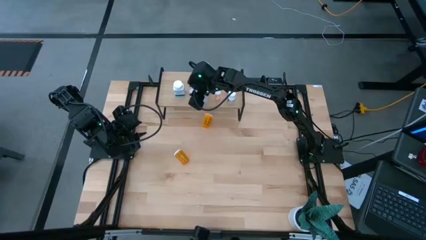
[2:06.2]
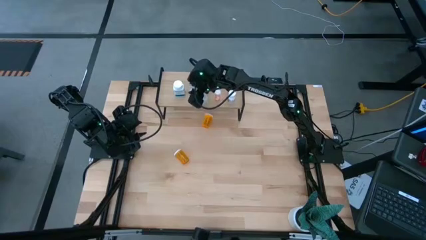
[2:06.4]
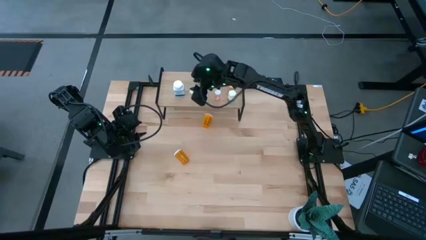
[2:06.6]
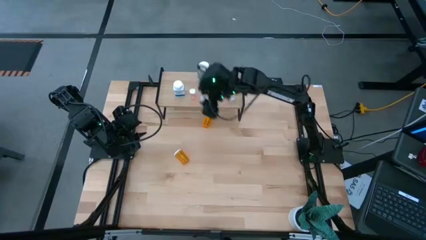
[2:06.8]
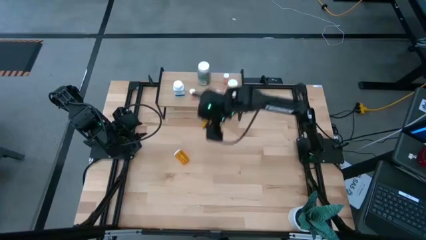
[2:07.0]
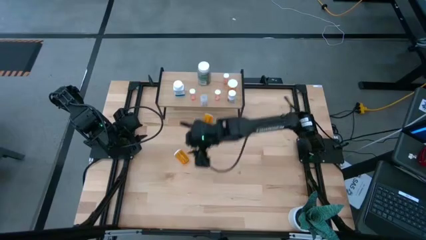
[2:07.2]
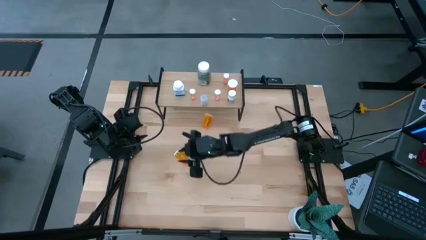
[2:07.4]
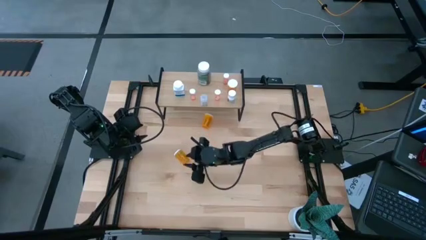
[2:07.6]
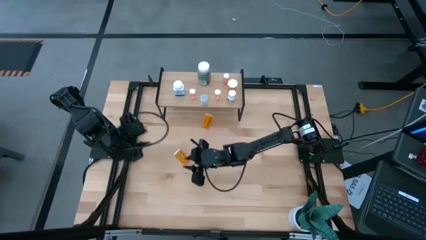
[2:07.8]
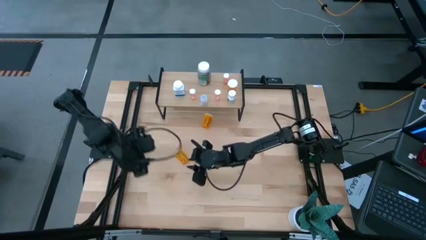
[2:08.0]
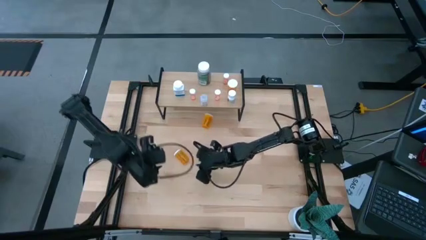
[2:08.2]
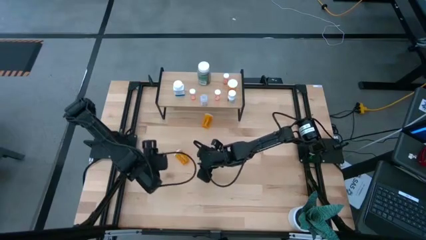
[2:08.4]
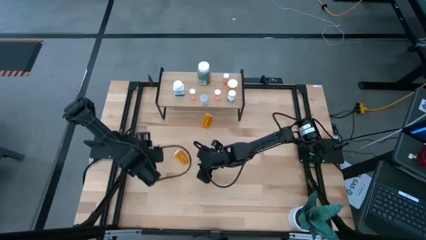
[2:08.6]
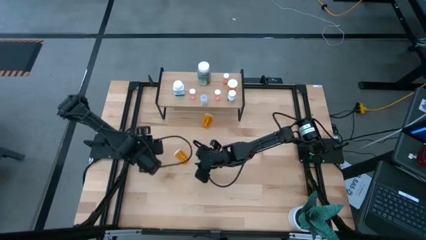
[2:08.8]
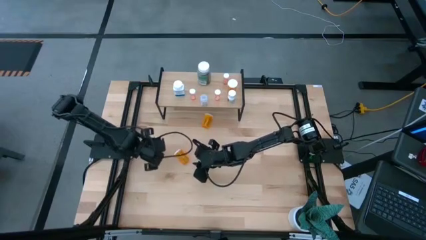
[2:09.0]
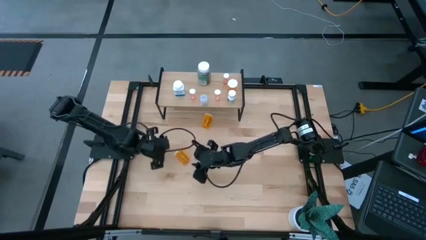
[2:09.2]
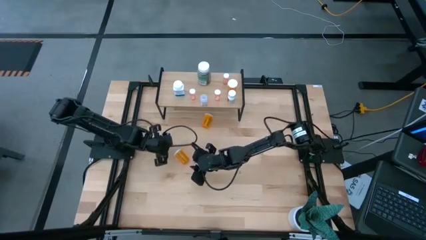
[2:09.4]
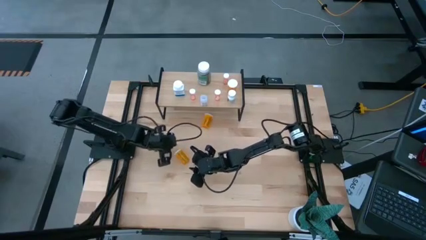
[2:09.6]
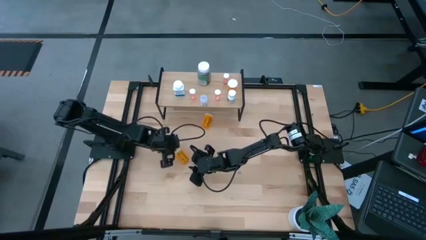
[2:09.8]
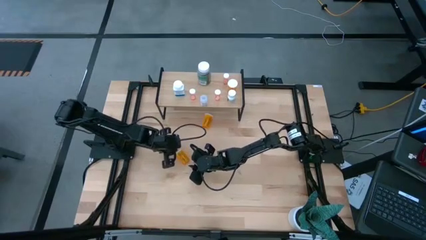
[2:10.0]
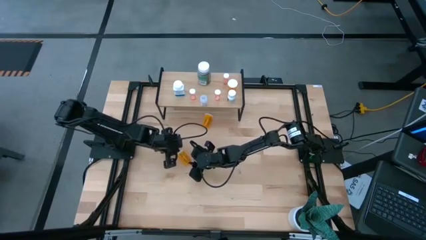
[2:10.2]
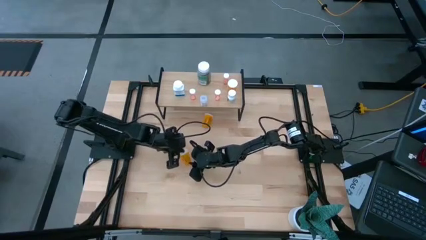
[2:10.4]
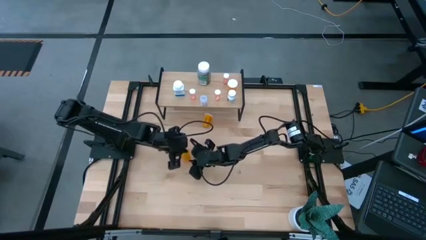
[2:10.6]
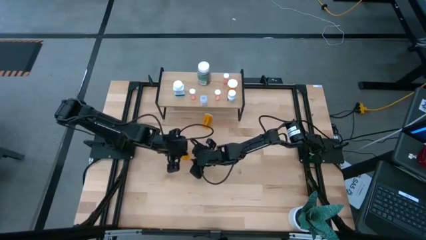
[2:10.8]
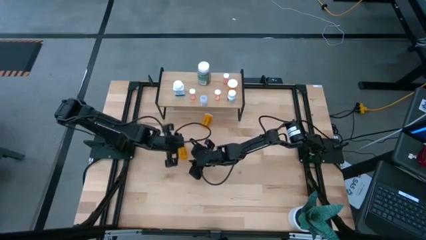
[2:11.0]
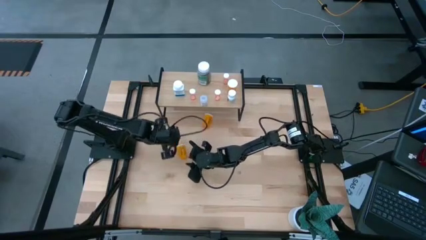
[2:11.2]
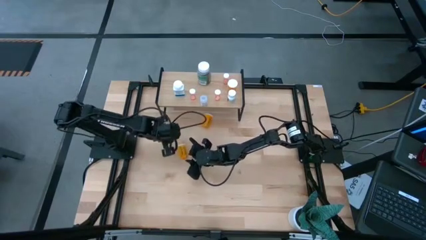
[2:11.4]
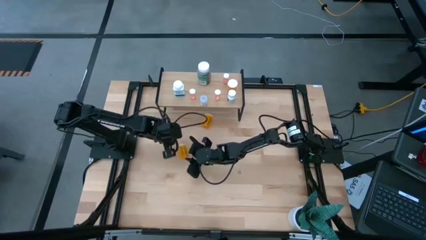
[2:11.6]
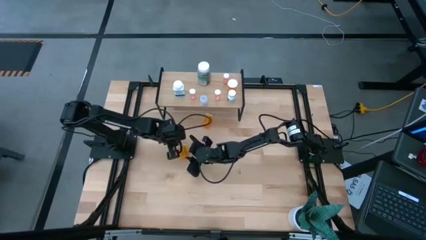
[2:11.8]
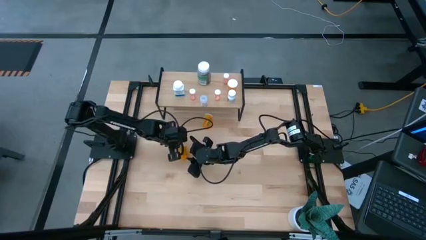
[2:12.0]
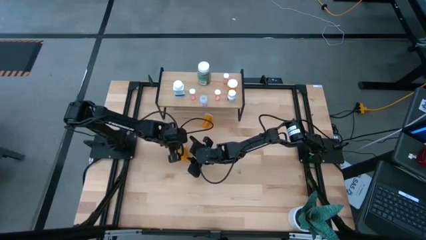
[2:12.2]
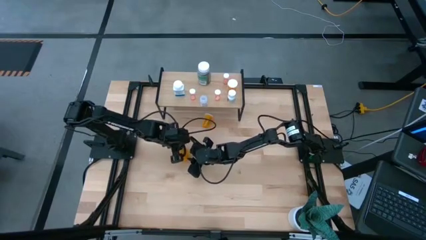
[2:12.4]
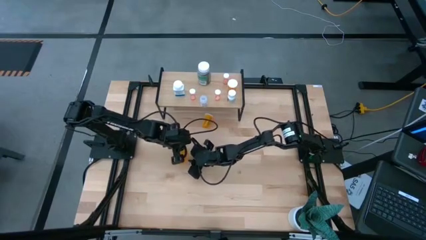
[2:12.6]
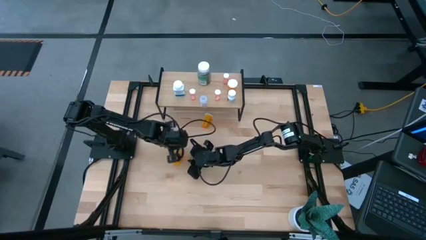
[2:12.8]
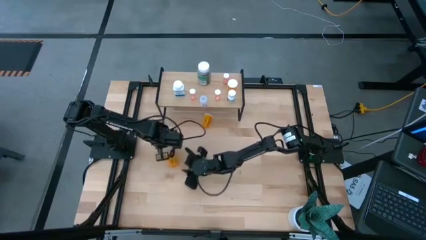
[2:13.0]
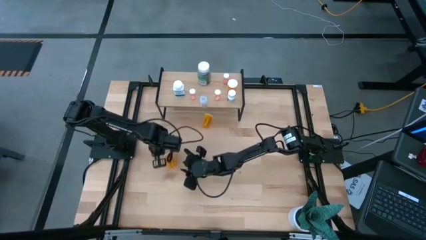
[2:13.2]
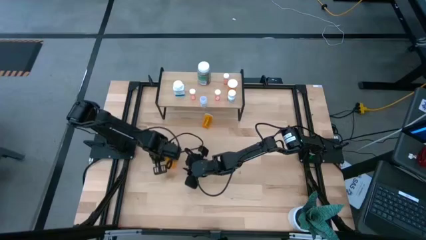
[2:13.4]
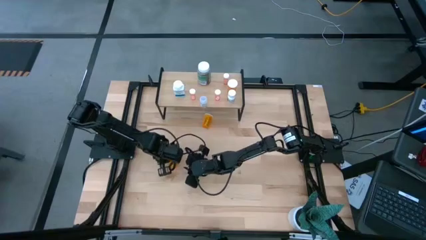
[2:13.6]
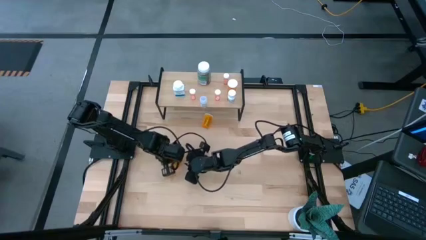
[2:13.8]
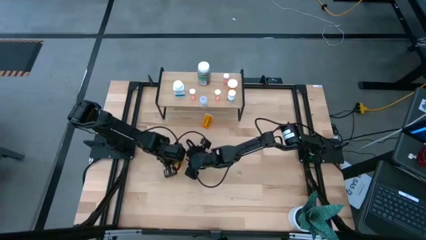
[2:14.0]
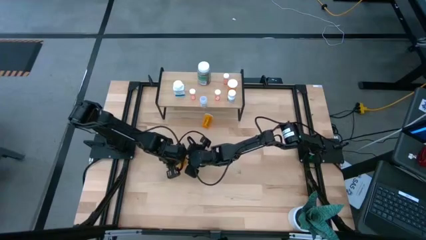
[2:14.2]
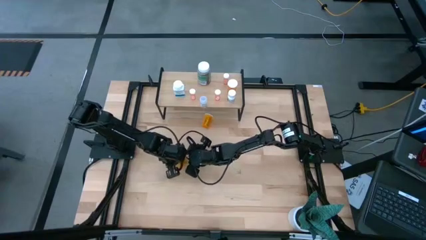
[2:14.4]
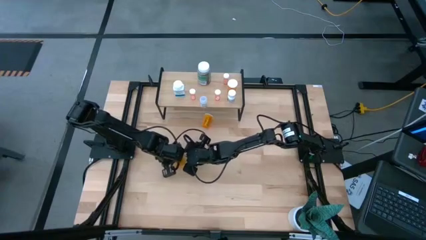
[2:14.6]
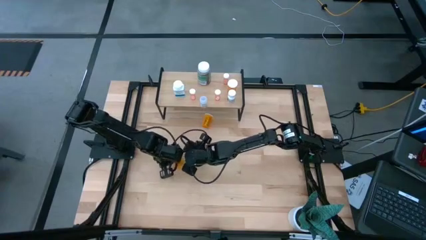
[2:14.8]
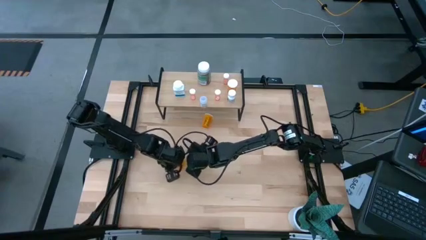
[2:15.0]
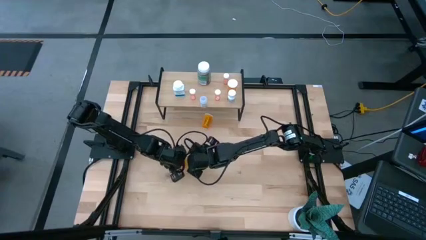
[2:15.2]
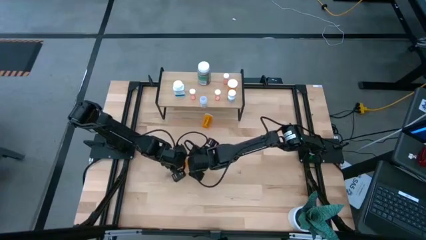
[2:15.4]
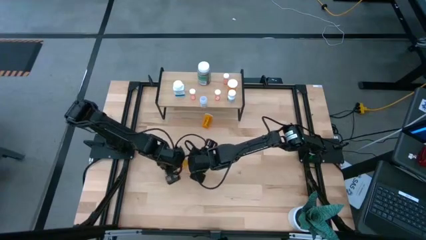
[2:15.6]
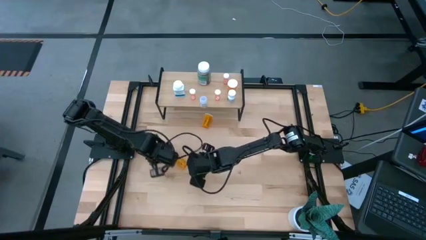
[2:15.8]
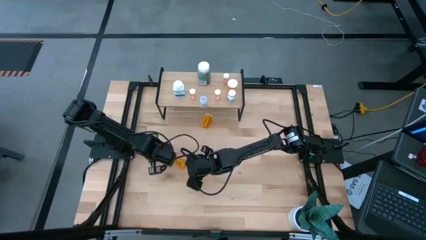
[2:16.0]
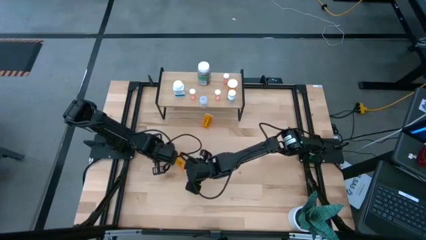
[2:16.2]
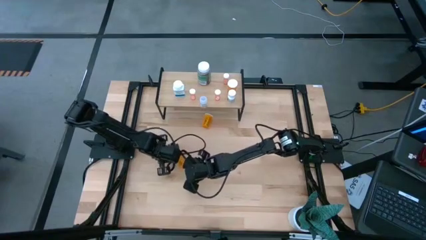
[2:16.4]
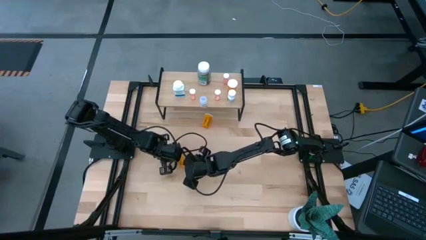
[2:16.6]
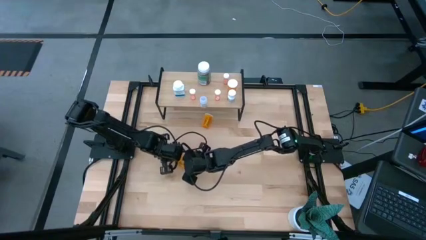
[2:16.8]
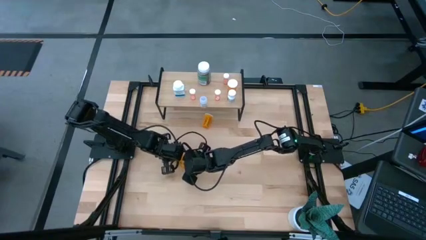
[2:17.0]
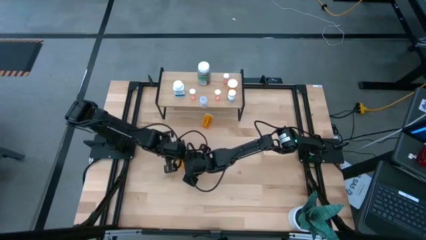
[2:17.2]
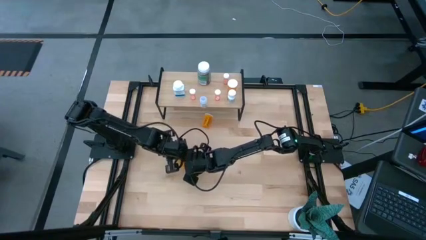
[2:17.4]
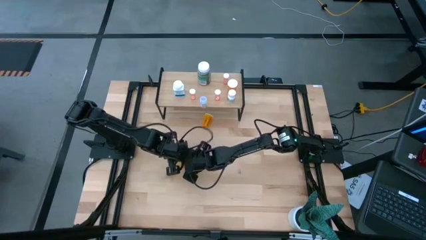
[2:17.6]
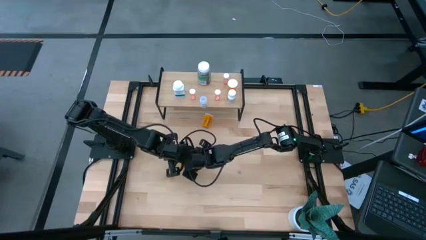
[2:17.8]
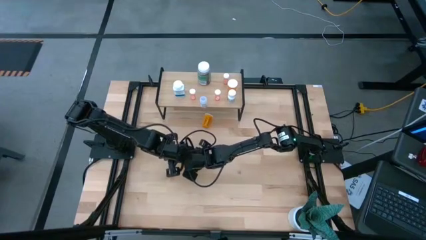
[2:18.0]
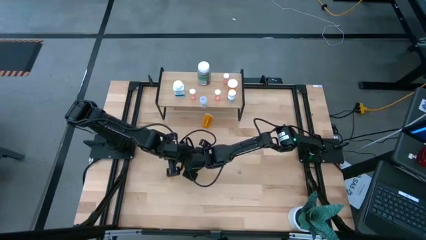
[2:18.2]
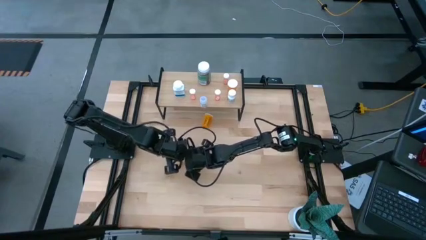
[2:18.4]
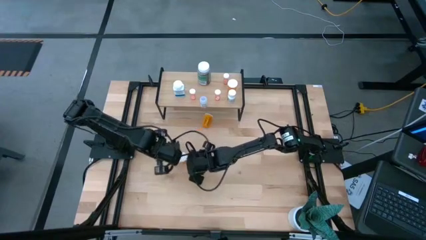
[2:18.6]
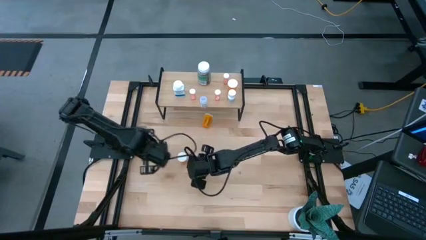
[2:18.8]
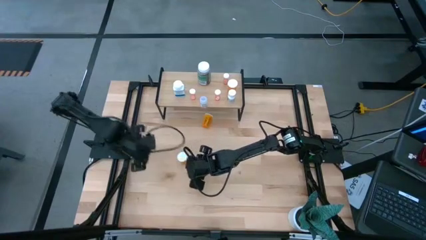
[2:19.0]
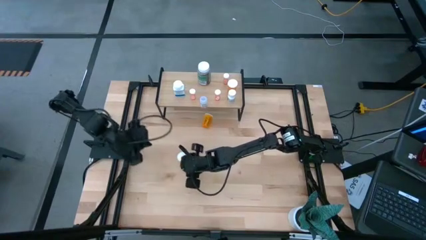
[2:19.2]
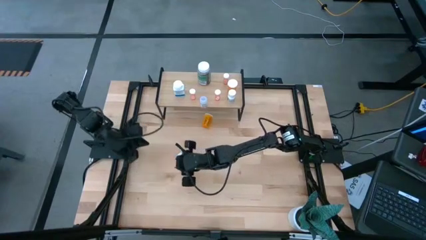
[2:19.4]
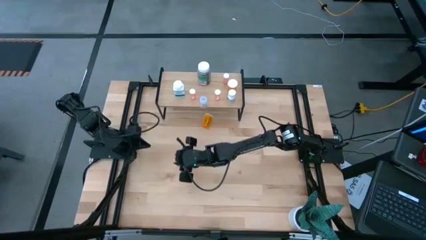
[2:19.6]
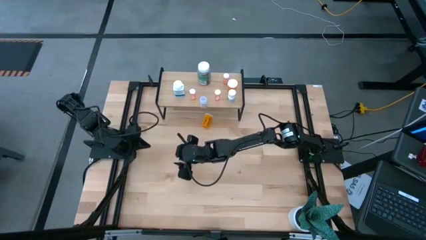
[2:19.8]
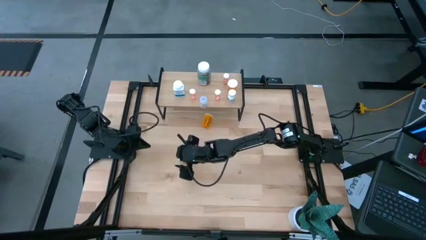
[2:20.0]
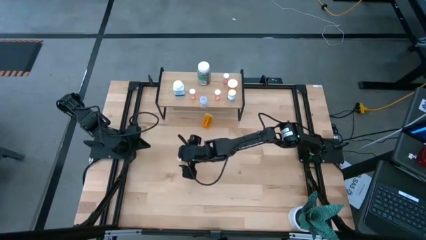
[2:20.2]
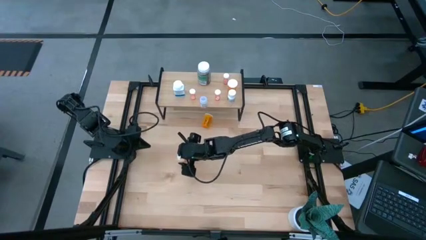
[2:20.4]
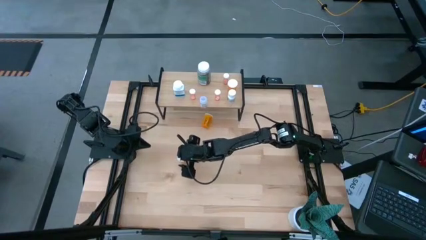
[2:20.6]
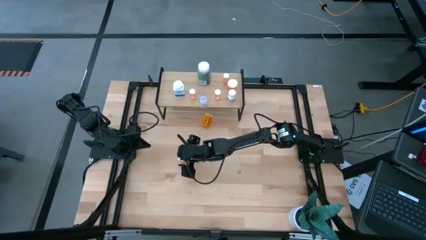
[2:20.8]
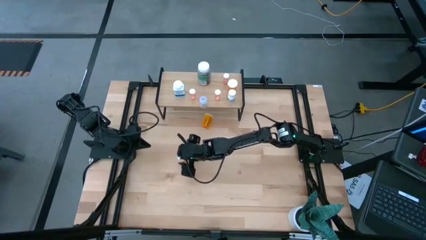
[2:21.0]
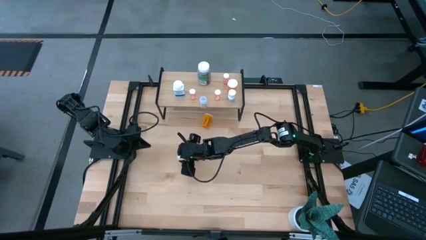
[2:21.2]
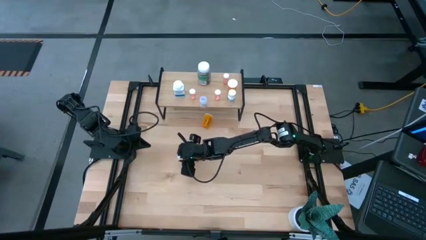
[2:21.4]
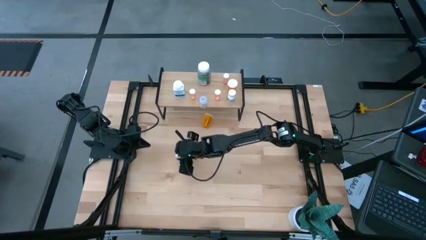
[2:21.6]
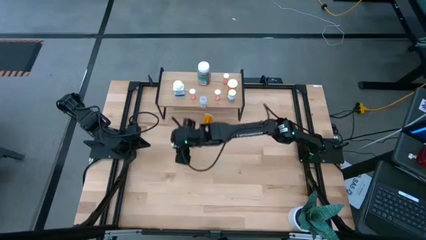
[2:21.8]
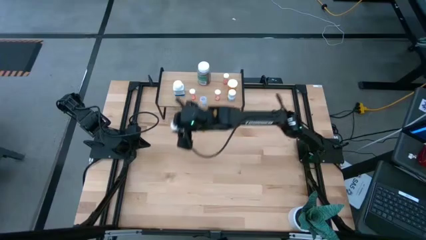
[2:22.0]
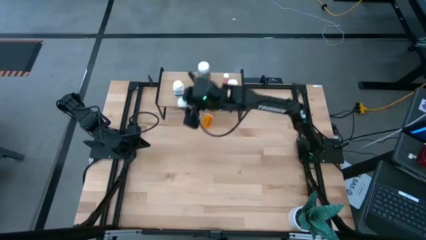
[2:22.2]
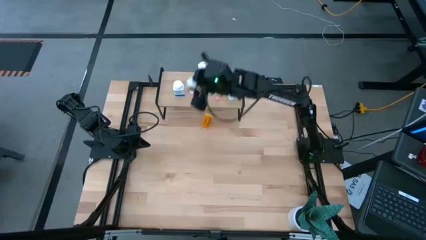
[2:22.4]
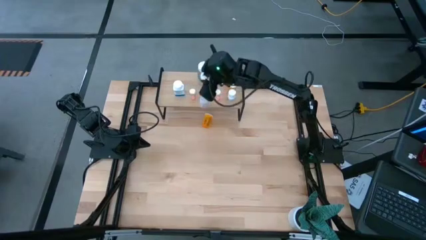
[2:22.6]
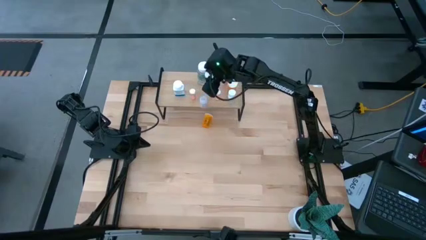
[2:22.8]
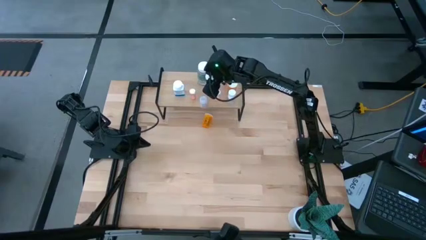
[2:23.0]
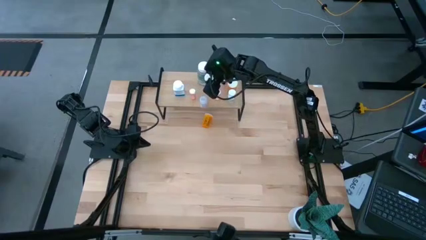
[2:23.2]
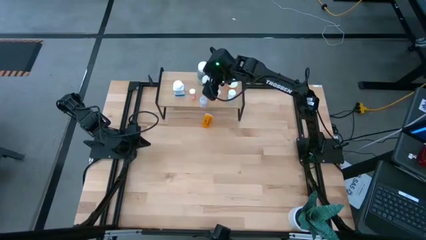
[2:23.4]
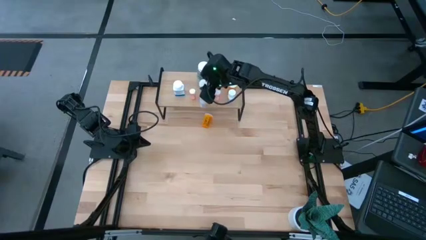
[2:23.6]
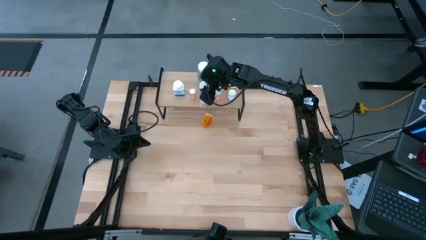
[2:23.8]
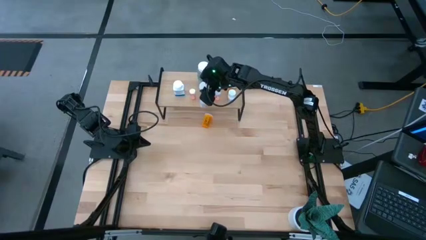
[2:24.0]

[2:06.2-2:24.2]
Task: Pick and place medicine bottles onto shelf by color
Put the bottom orange pill bottle on the shelf
